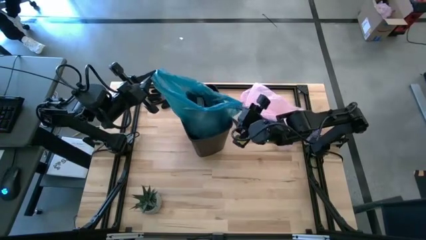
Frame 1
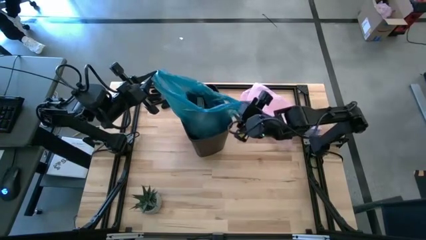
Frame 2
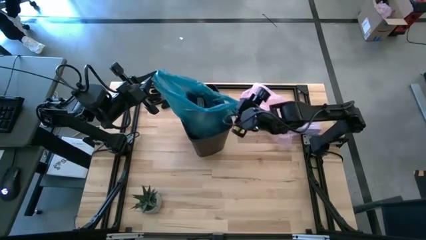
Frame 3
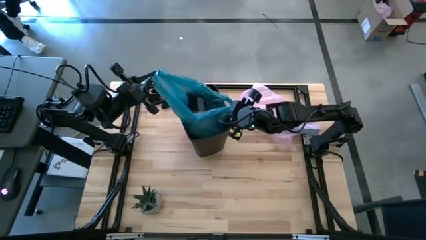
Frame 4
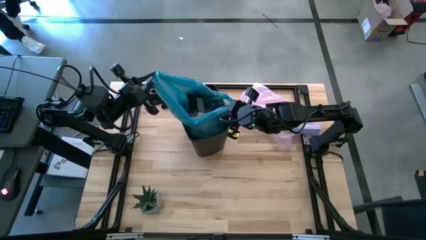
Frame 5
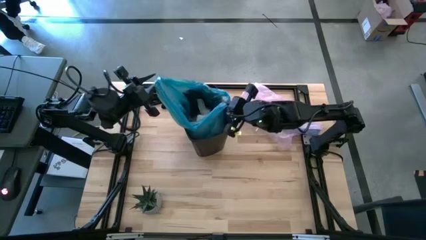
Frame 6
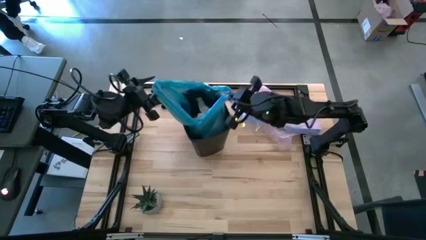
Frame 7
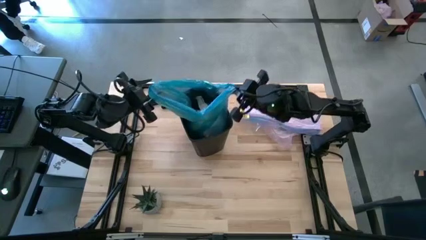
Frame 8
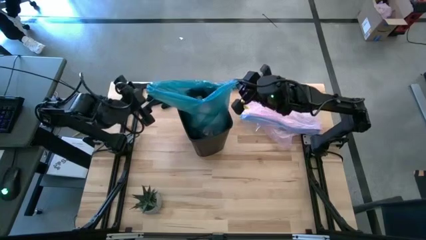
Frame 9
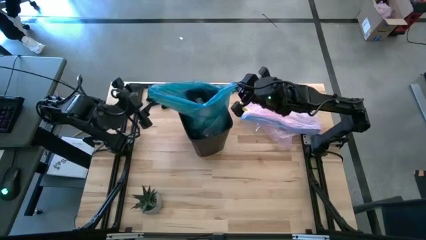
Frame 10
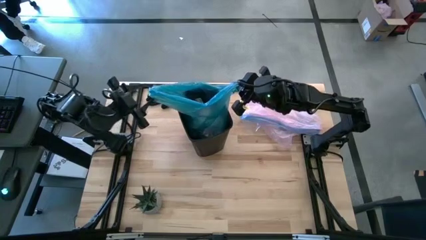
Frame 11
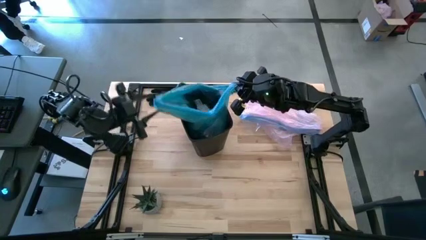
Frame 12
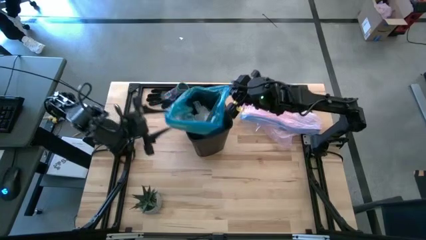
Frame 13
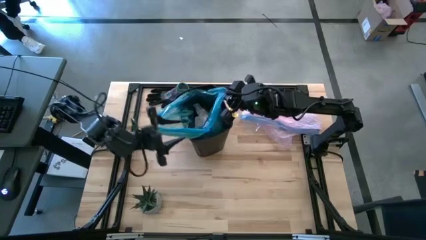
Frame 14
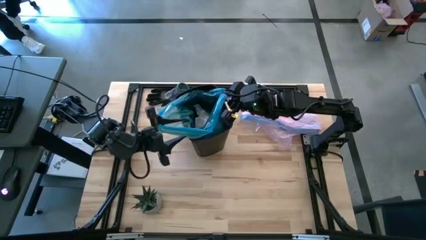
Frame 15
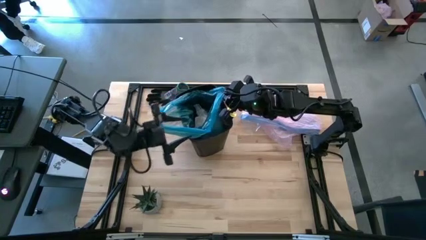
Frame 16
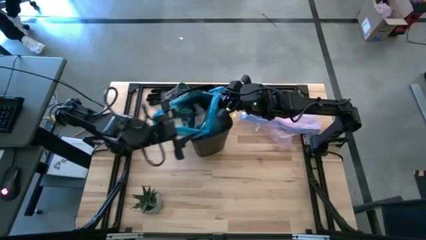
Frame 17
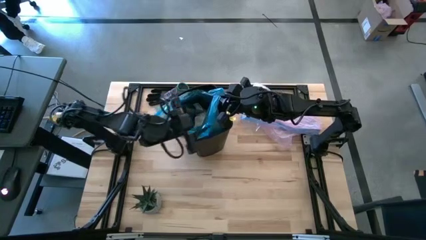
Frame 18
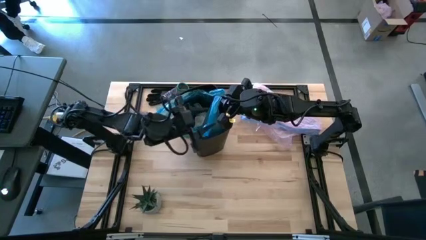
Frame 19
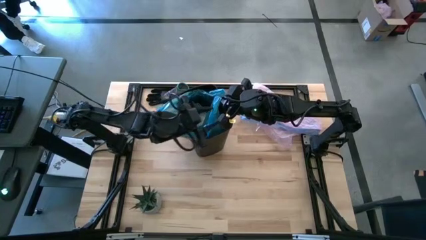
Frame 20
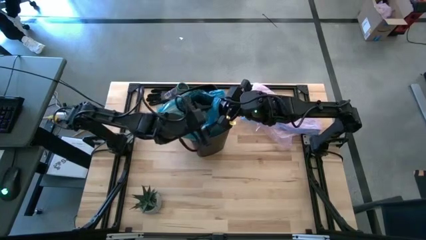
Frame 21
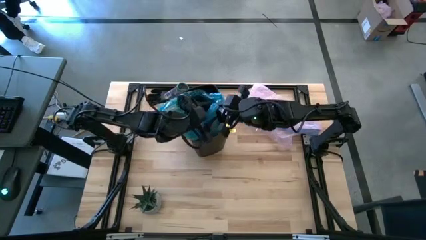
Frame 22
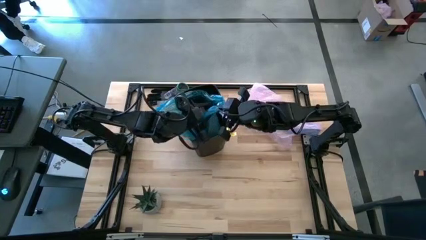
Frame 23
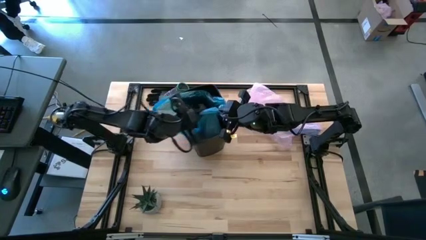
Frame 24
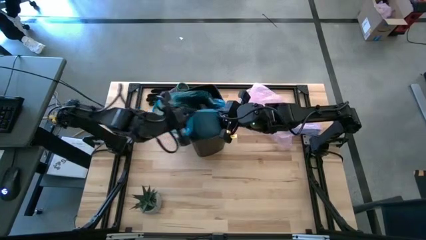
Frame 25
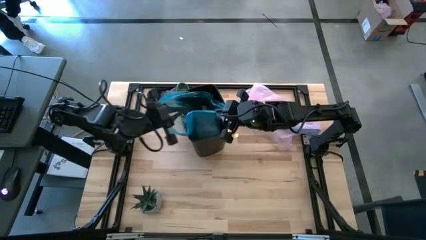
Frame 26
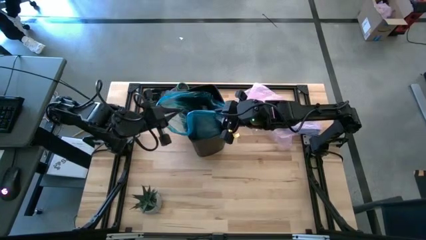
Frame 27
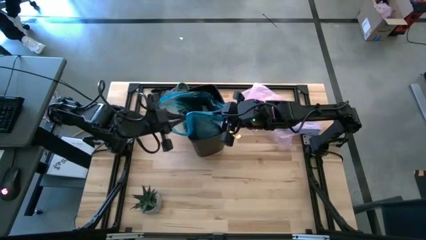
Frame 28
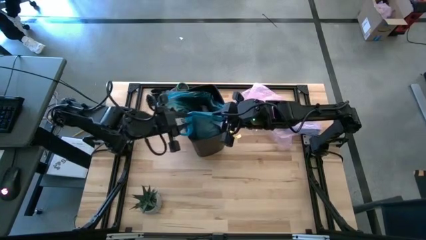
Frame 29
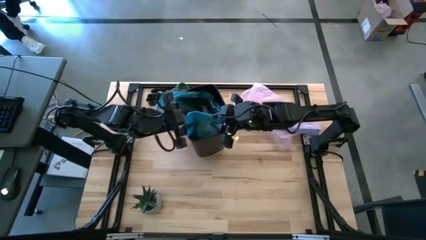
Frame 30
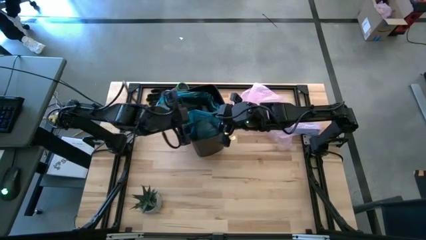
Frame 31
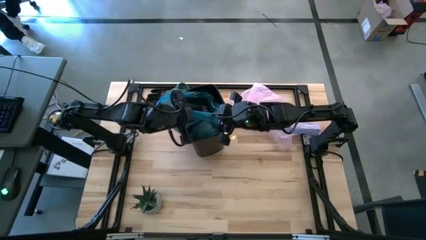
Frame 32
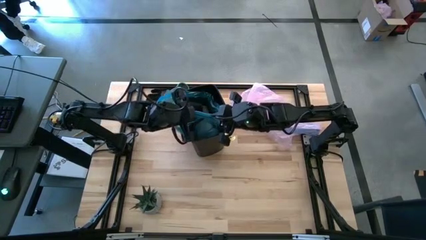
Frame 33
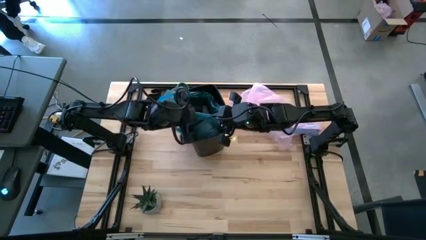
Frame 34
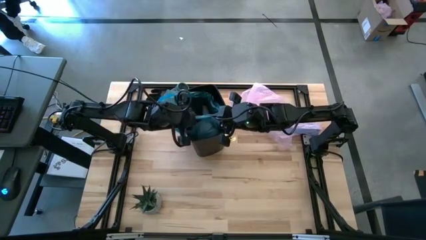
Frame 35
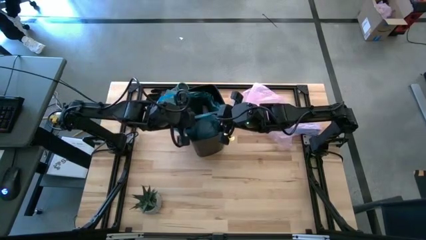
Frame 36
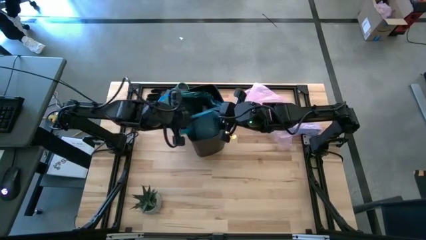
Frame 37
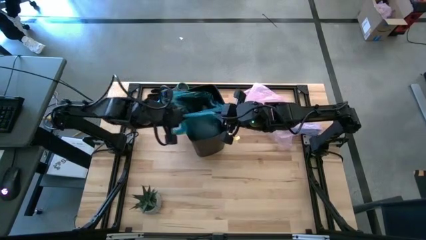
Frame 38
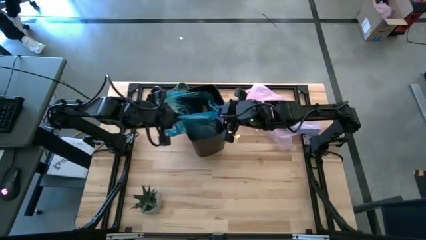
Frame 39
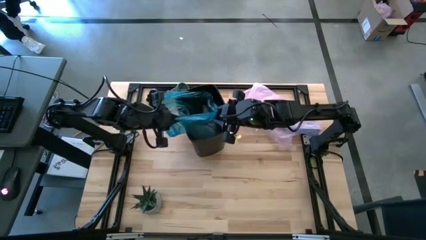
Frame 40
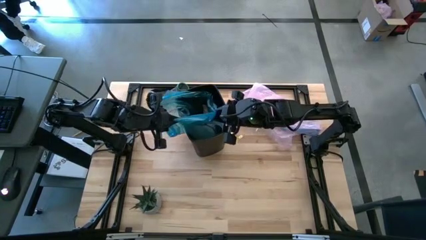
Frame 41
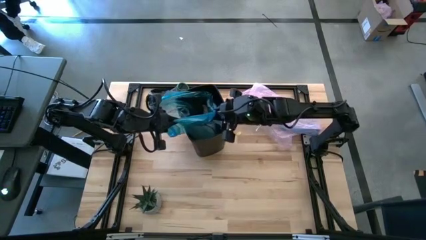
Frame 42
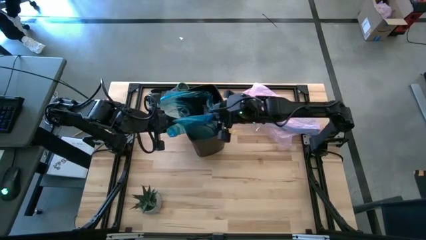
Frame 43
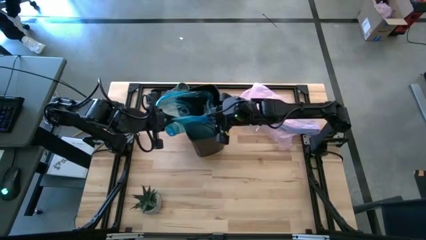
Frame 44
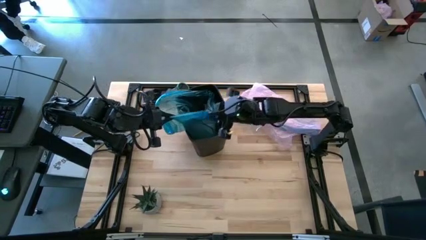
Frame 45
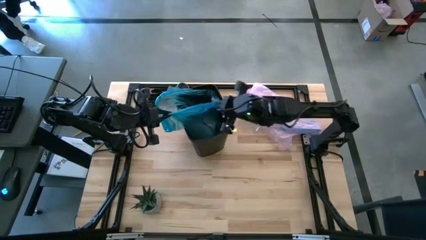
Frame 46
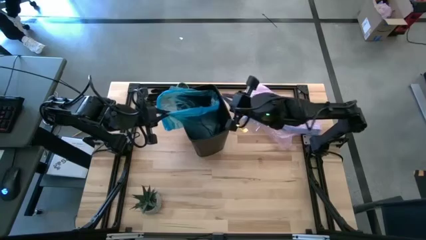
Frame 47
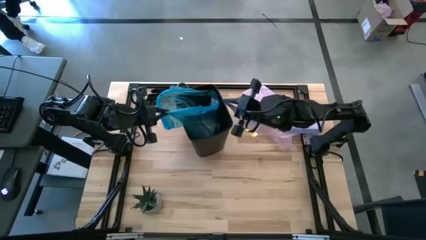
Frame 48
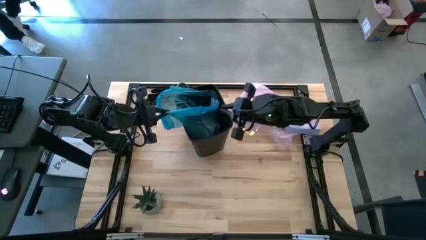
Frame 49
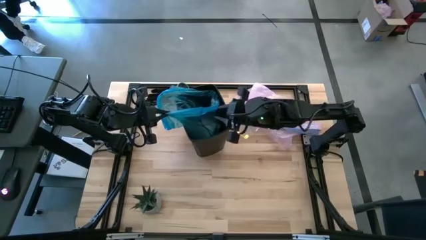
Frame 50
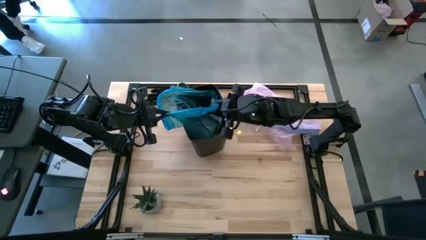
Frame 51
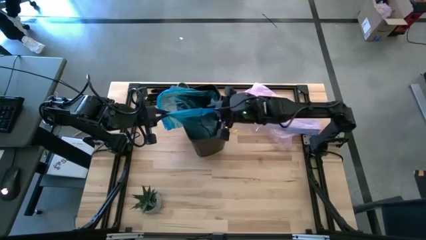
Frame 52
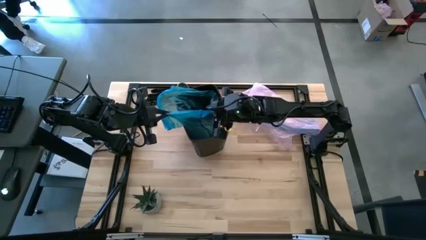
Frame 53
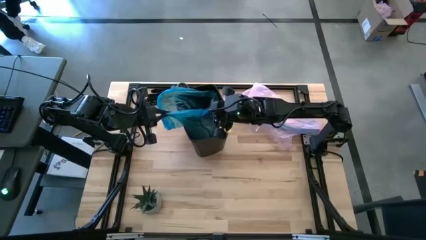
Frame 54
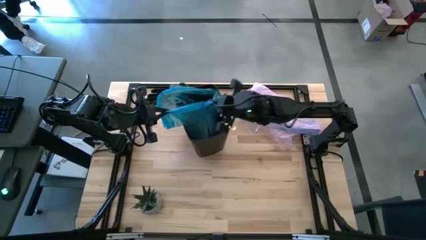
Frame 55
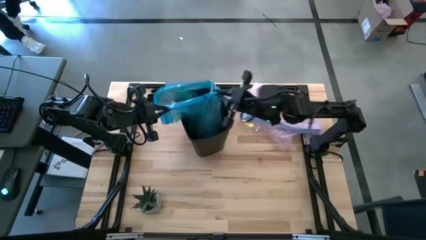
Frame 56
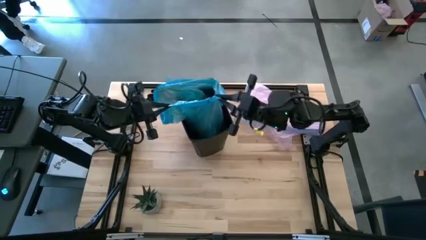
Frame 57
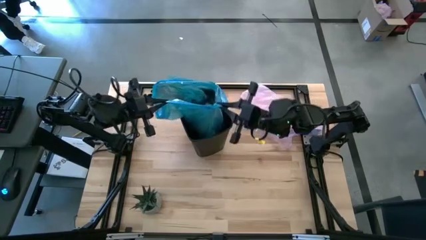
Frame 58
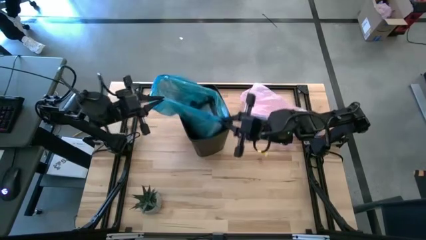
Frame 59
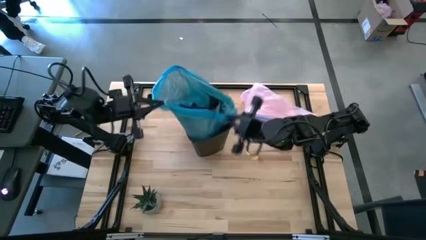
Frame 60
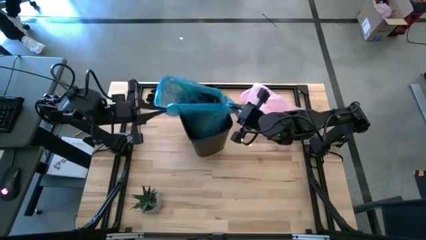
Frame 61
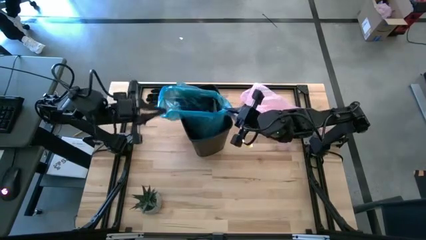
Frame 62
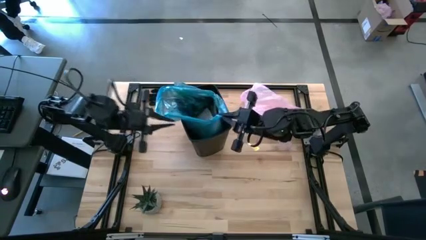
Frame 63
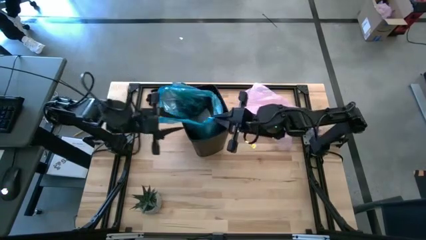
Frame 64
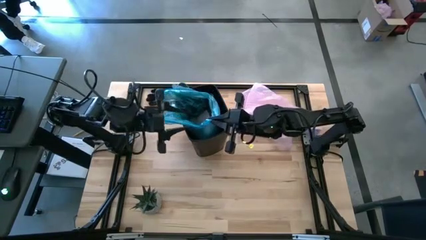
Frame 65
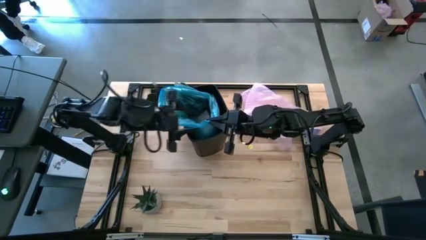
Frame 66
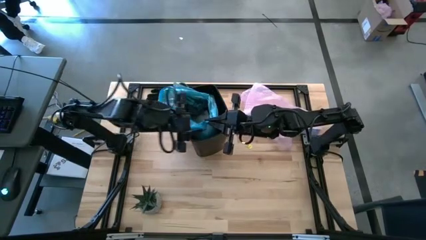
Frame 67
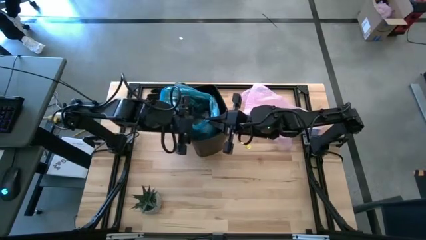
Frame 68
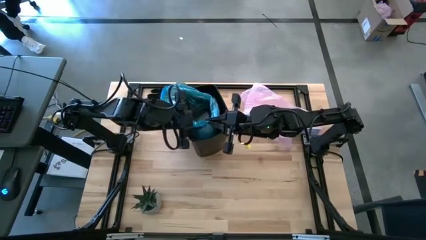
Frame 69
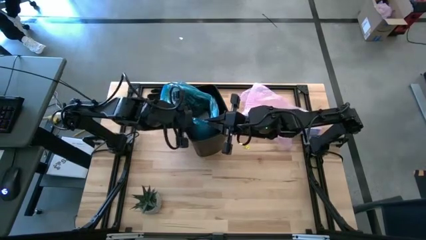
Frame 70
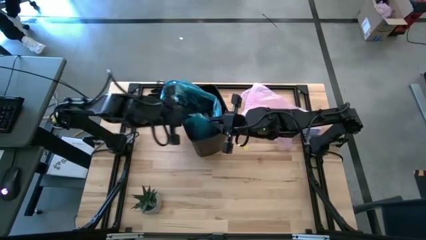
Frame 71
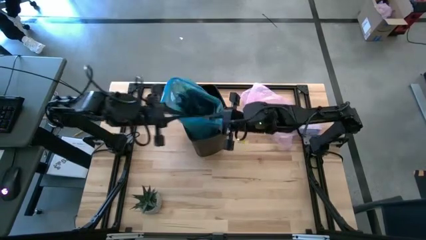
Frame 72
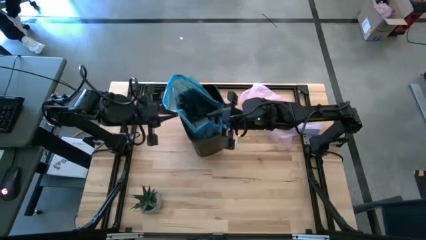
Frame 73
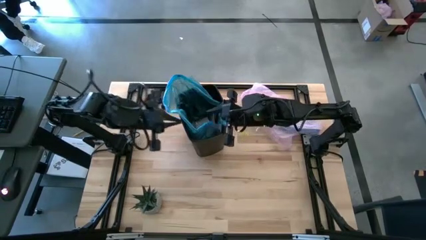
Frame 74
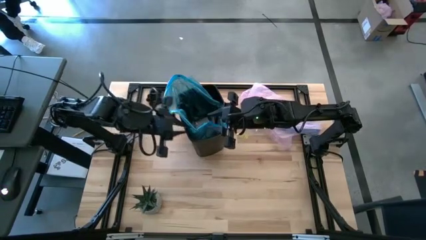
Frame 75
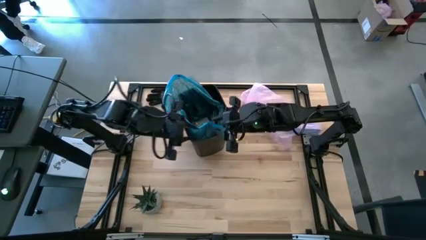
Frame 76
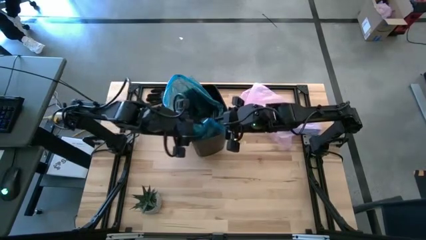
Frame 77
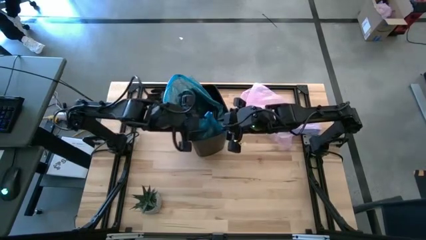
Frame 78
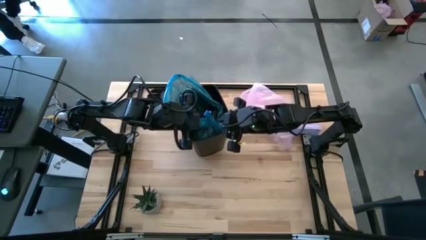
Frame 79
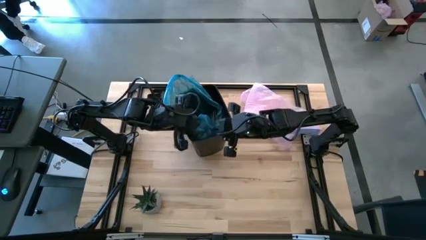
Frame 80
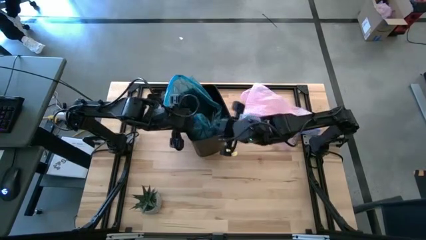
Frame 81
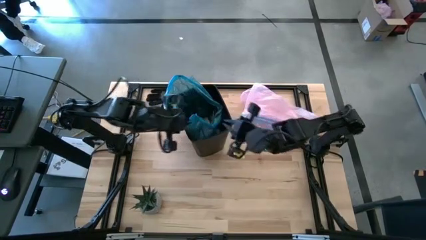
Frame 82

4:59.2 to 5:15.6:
Task: place trash/remove bag and relplace
Remove the blue trash bag from the trash bin
